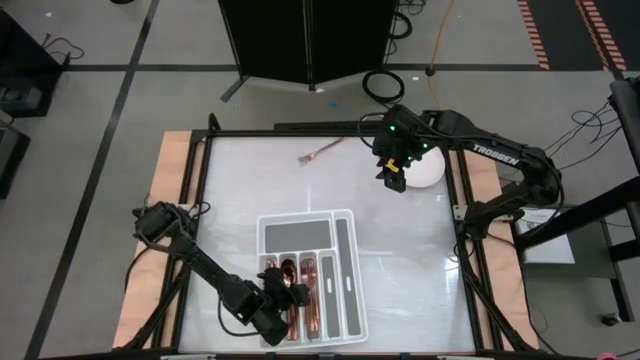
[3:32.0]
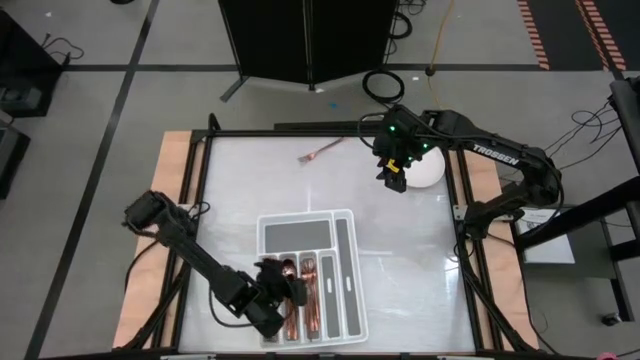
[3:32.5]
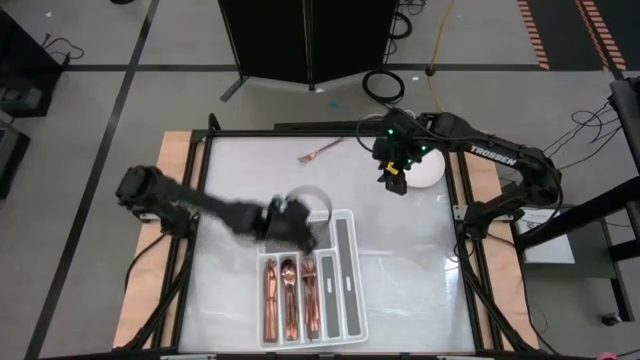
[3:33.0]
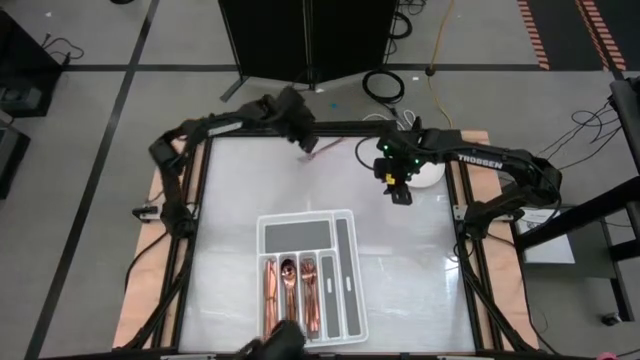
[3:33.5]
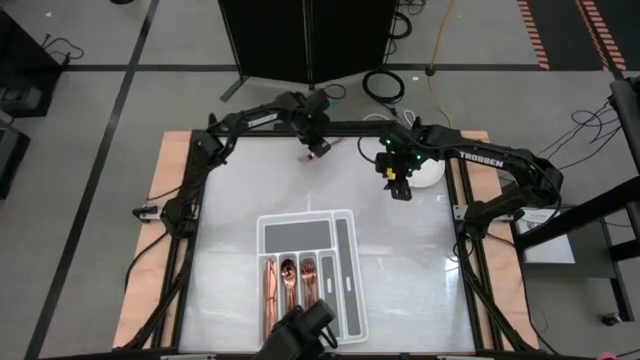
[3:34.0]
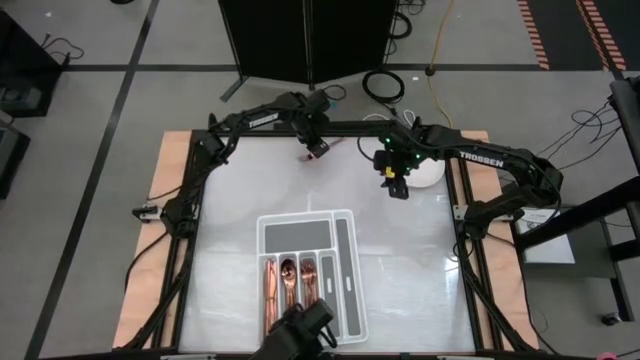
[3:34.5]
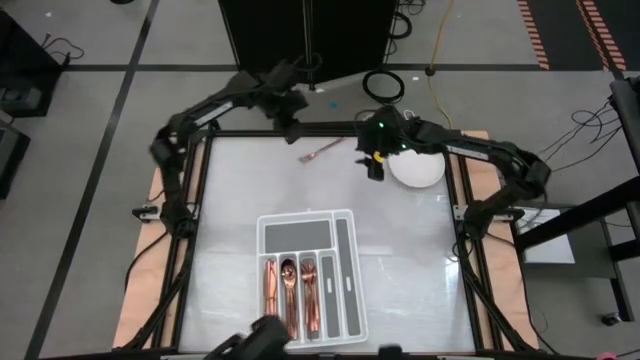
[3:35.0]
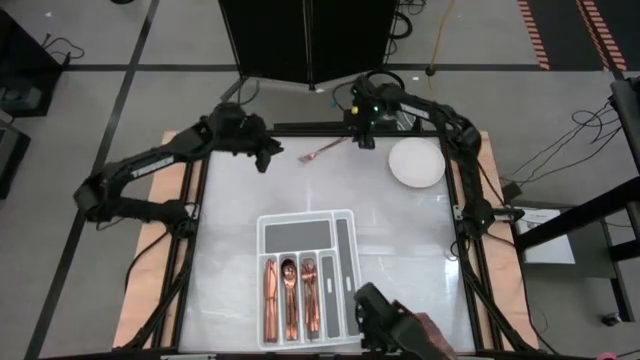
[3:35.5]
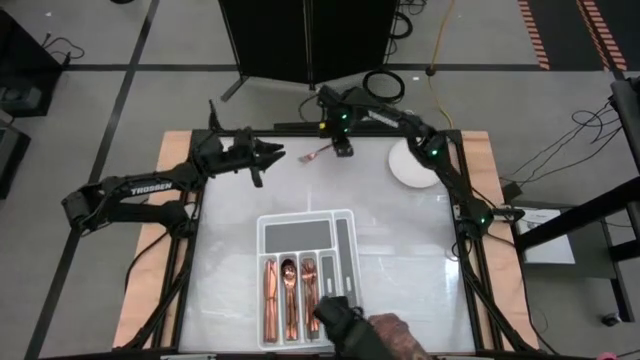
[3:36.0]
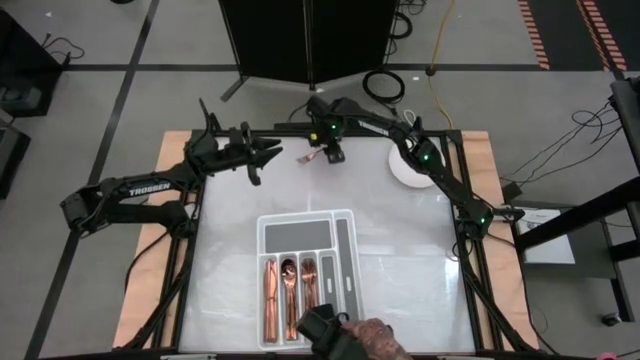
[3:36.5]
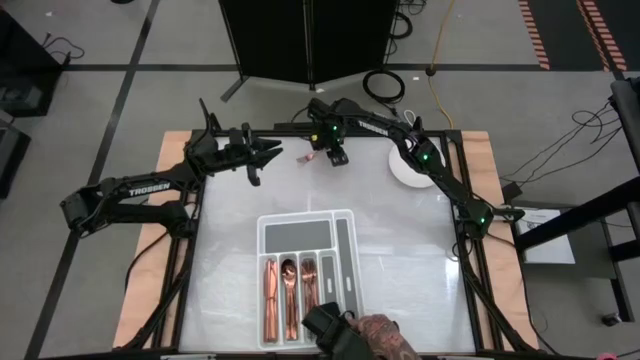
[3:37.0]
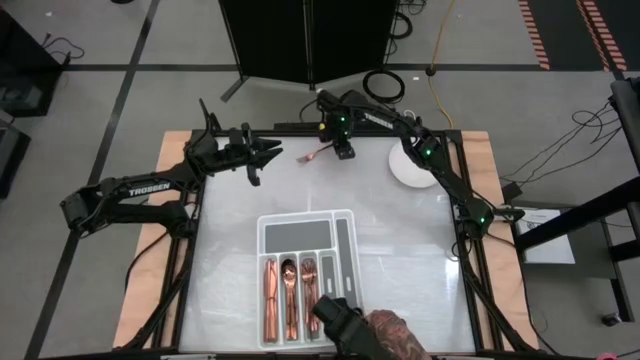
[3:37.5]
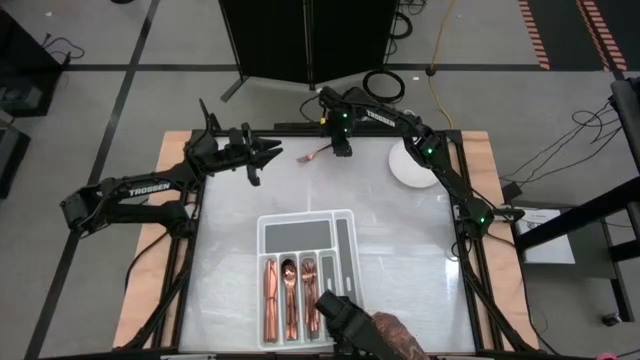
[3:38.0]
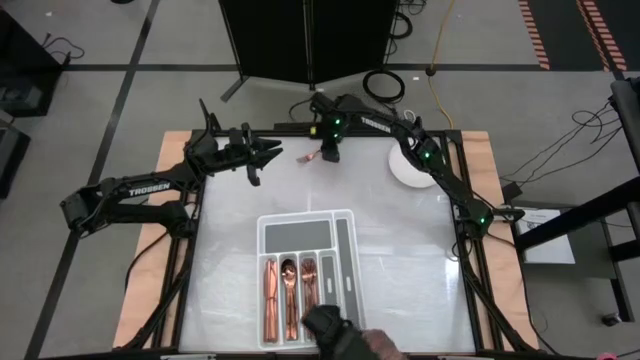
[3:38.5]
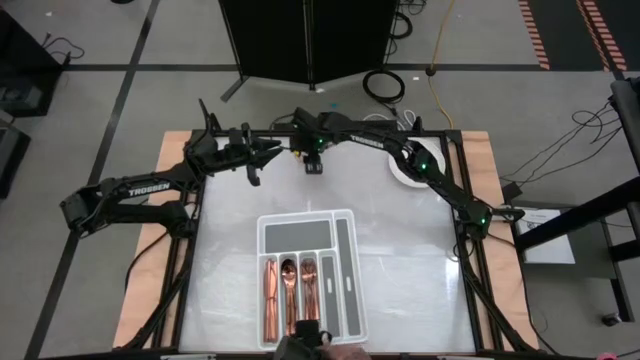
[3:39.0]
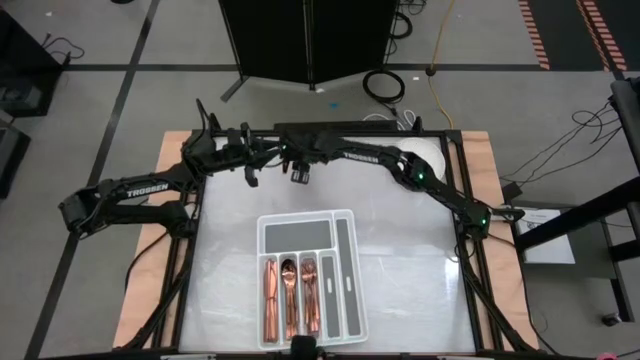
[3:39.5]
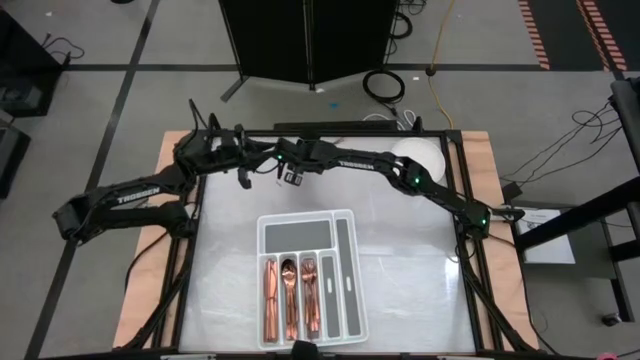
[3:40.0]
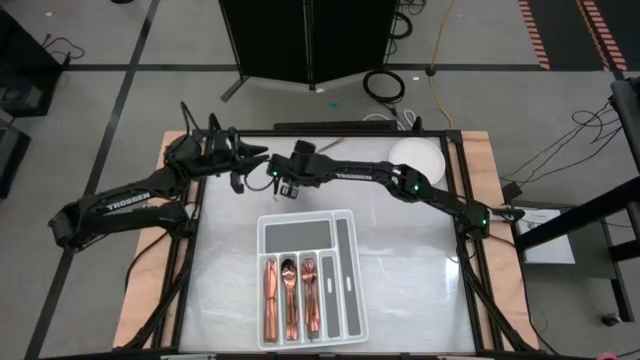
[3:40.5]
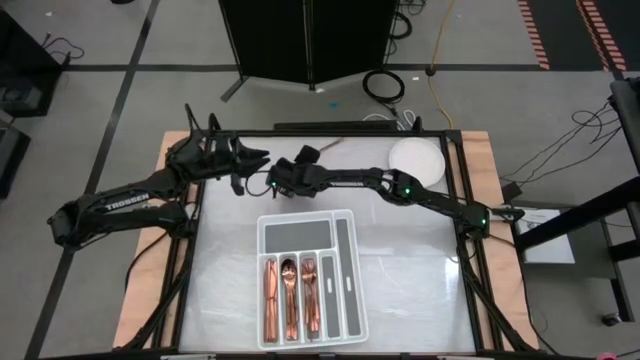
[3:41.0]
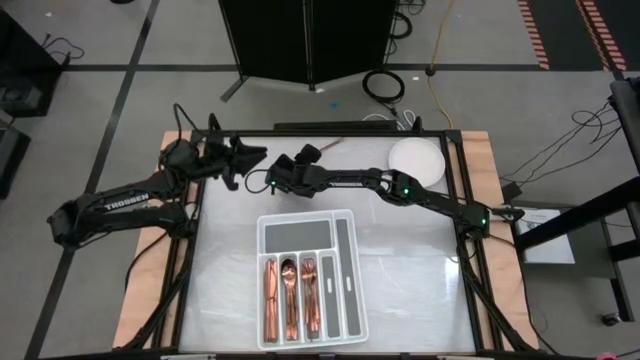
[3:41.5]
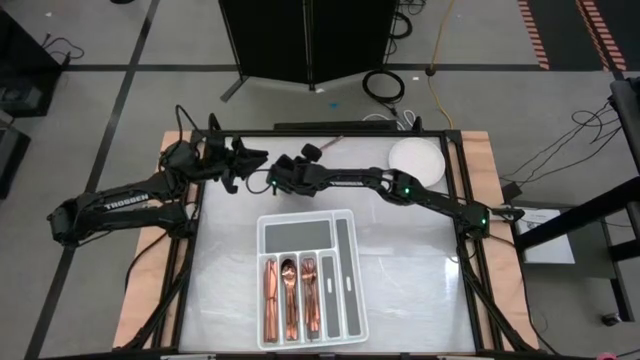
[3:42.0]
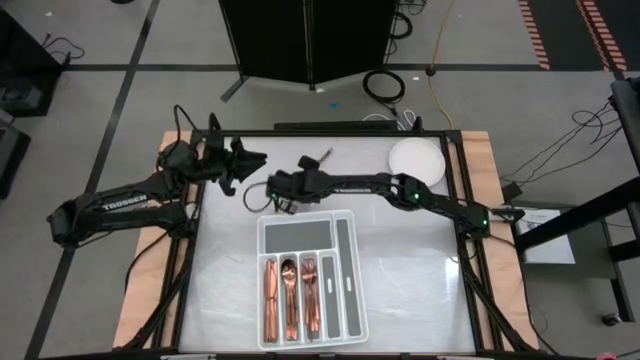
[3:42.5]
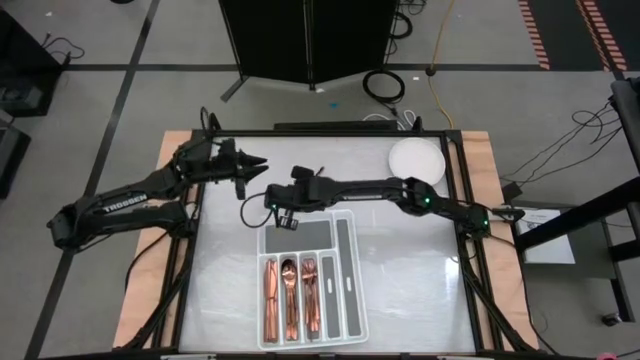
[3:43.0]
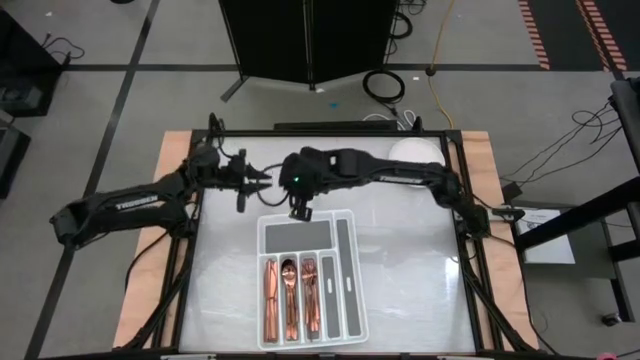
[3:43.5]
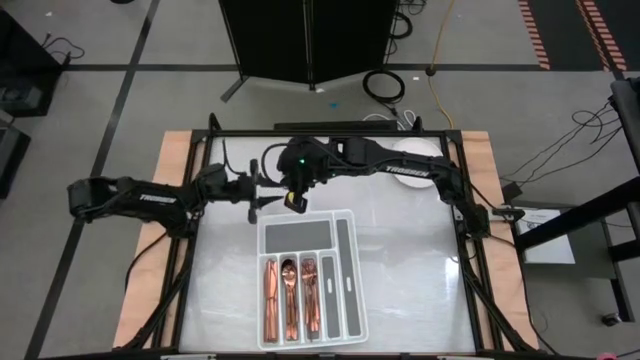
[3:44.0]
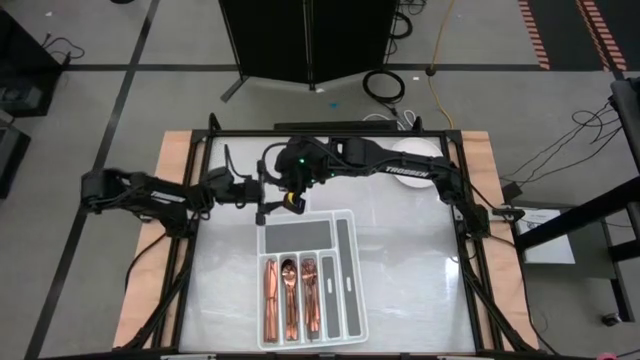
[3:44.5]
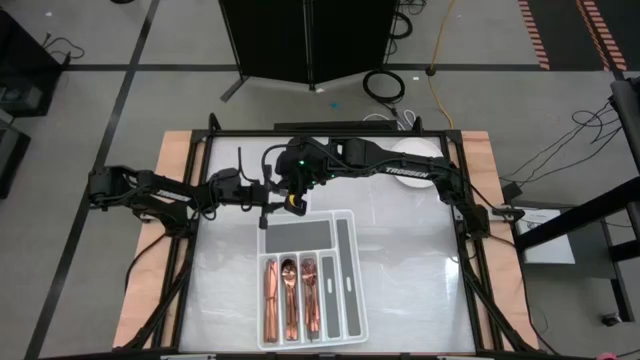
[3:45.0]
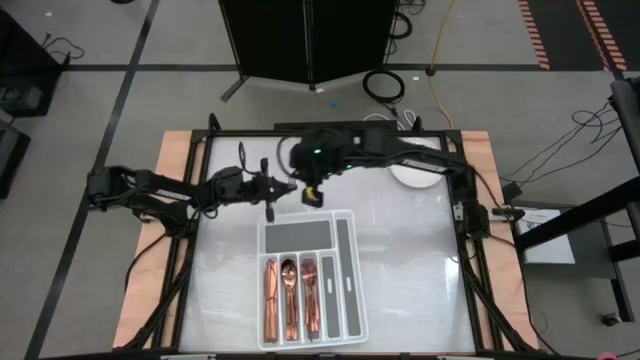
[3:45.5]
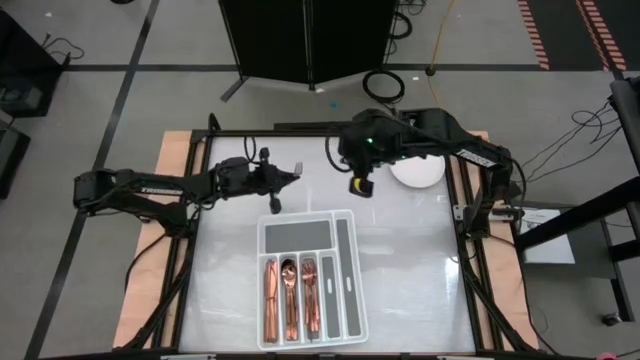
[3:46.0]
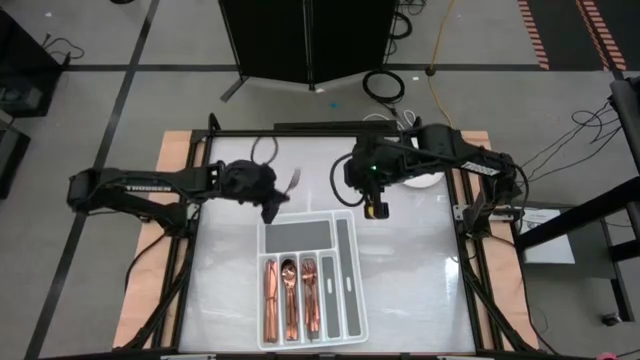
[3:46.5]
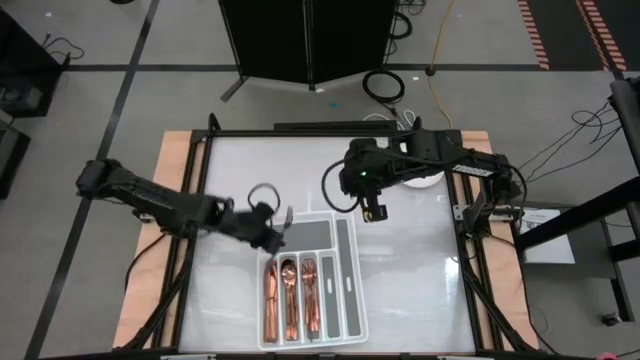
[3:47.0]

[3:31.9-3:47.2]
Task: Sort silverware
Put the fork into the silverware tray
